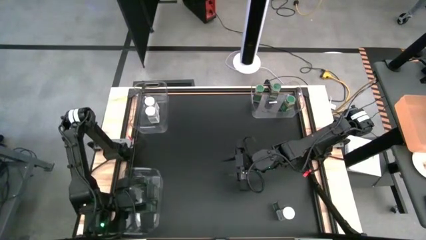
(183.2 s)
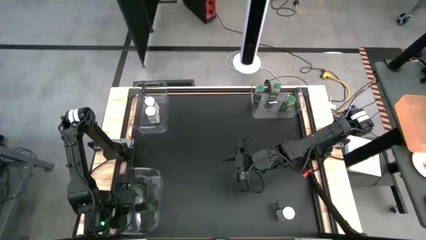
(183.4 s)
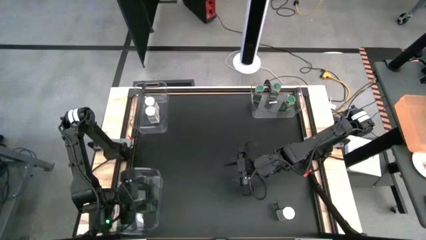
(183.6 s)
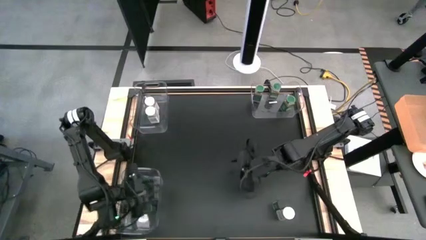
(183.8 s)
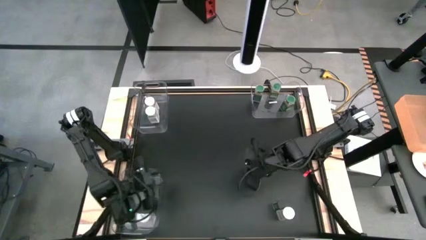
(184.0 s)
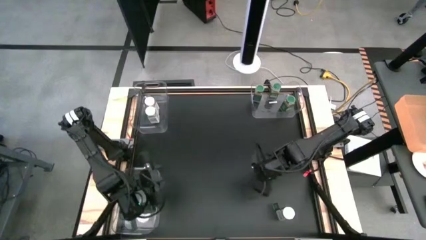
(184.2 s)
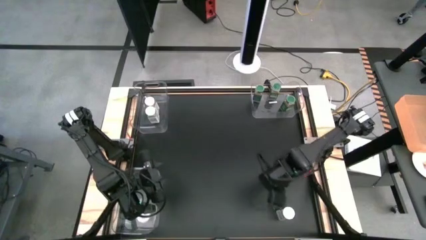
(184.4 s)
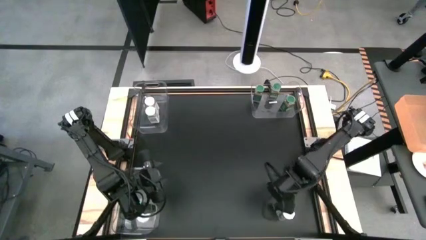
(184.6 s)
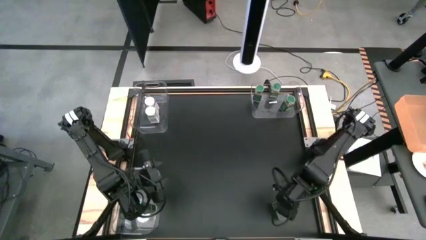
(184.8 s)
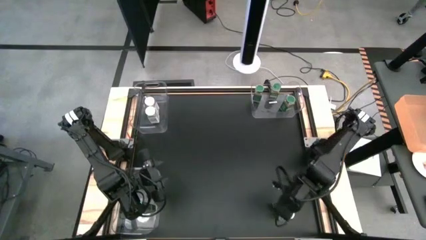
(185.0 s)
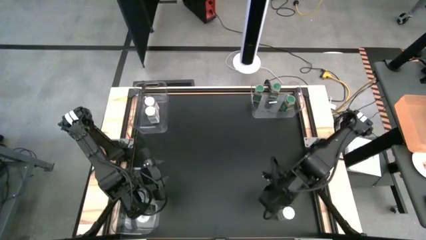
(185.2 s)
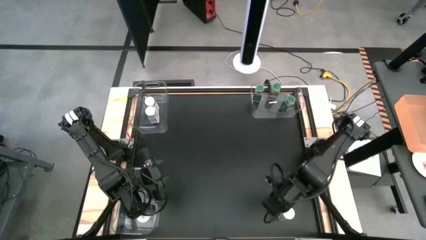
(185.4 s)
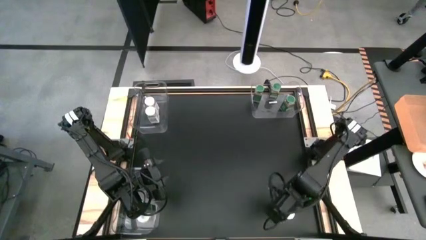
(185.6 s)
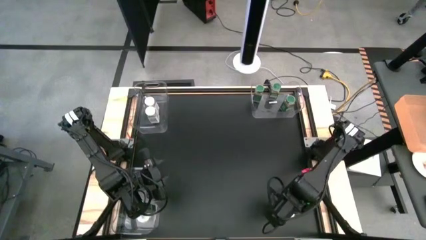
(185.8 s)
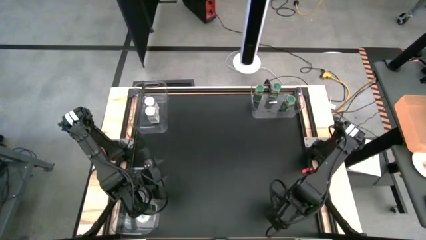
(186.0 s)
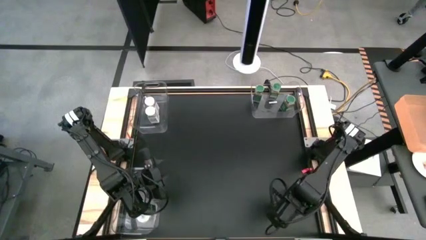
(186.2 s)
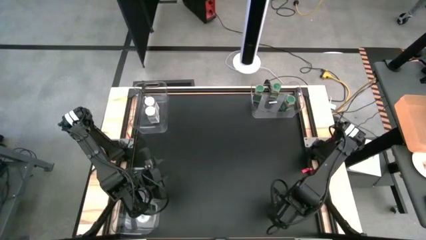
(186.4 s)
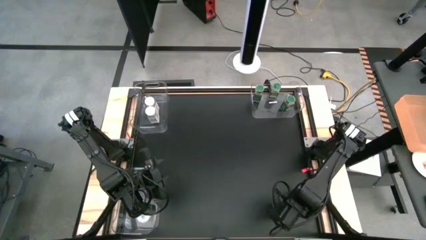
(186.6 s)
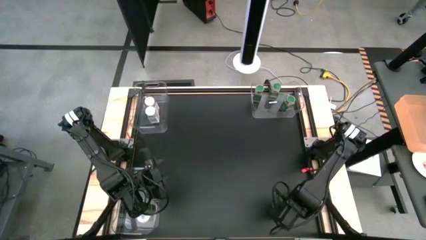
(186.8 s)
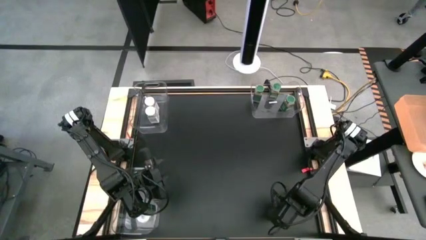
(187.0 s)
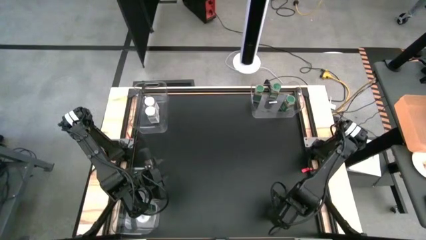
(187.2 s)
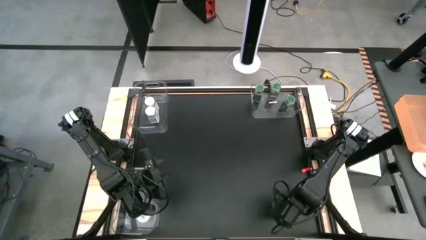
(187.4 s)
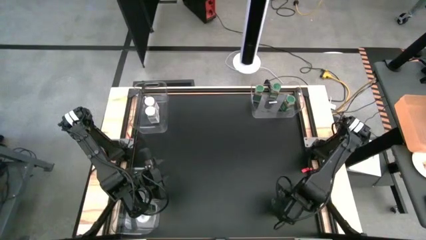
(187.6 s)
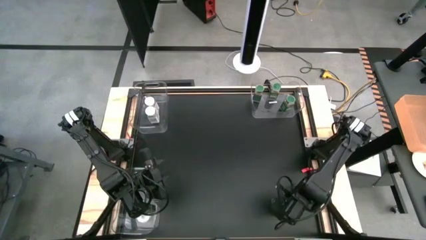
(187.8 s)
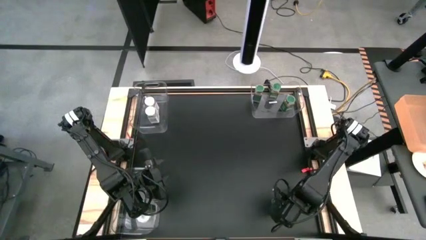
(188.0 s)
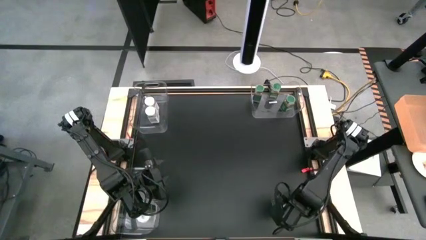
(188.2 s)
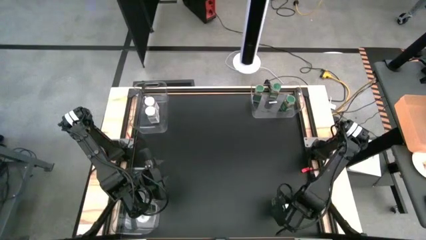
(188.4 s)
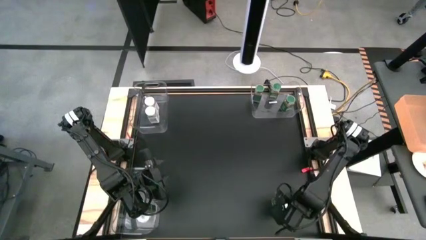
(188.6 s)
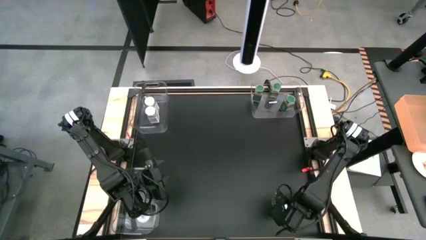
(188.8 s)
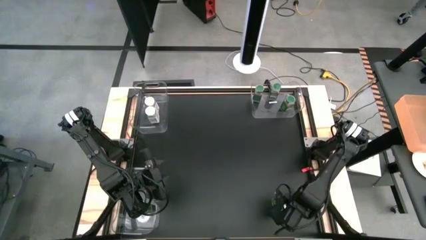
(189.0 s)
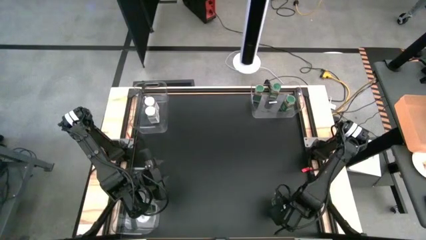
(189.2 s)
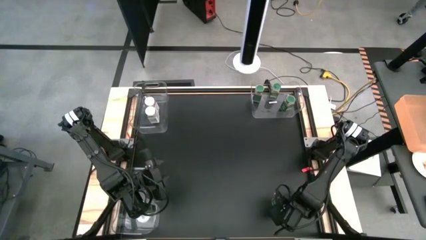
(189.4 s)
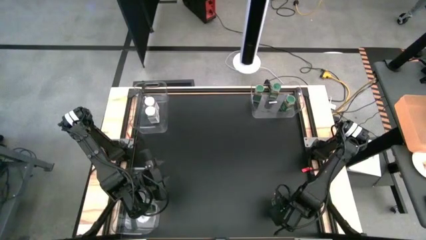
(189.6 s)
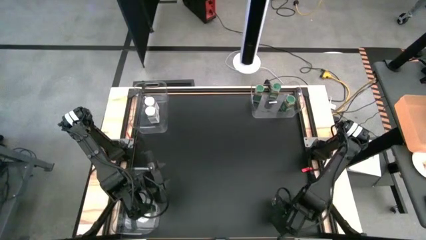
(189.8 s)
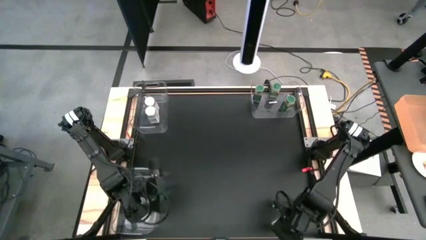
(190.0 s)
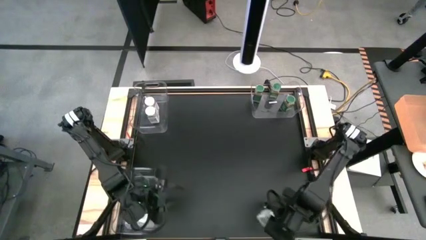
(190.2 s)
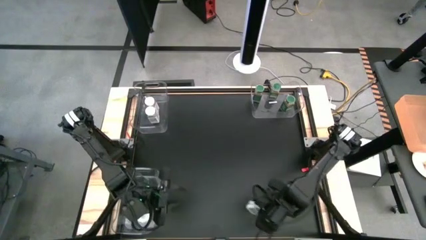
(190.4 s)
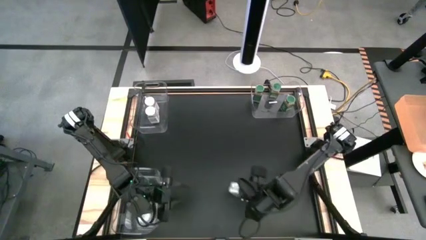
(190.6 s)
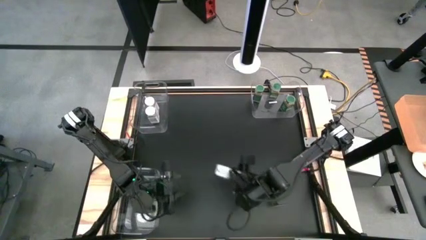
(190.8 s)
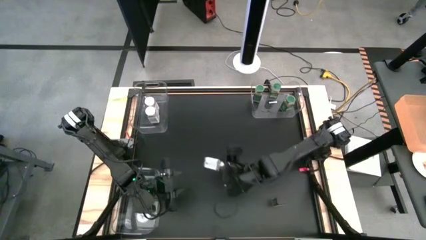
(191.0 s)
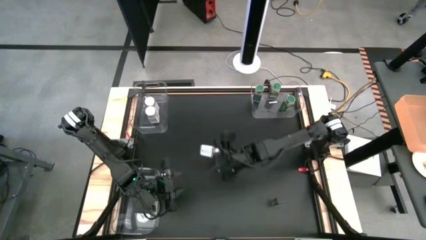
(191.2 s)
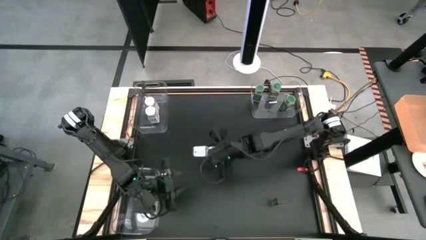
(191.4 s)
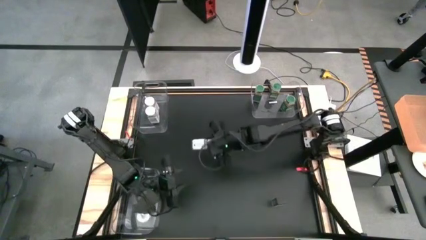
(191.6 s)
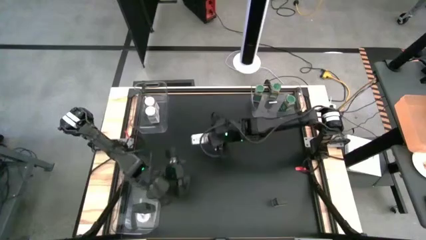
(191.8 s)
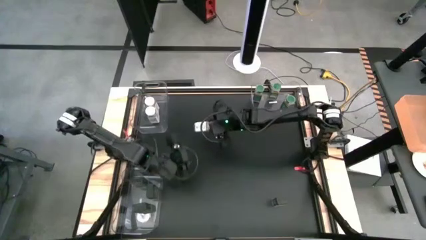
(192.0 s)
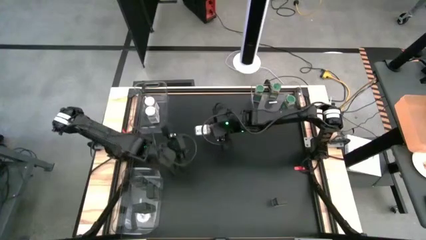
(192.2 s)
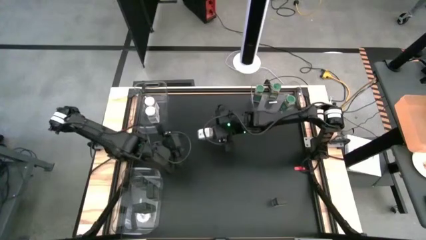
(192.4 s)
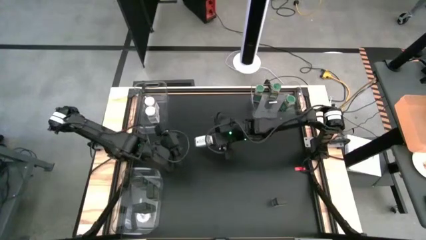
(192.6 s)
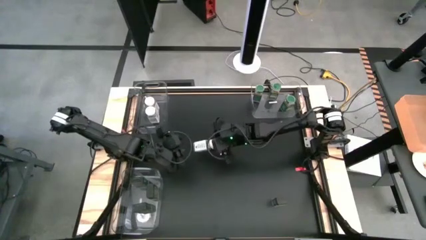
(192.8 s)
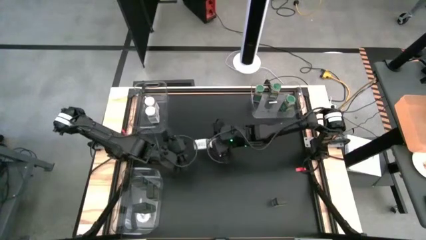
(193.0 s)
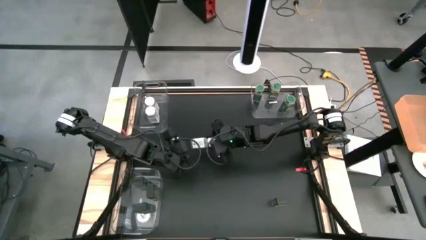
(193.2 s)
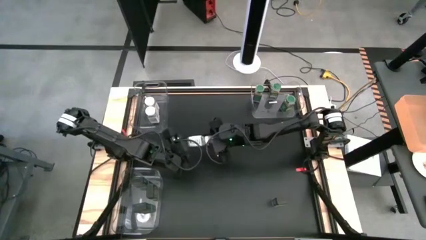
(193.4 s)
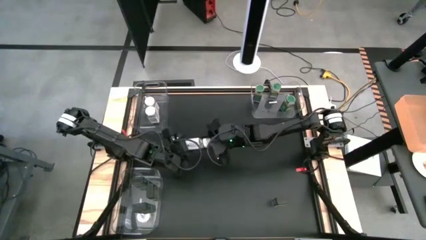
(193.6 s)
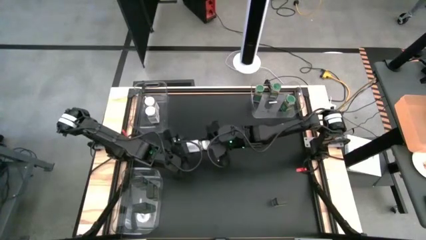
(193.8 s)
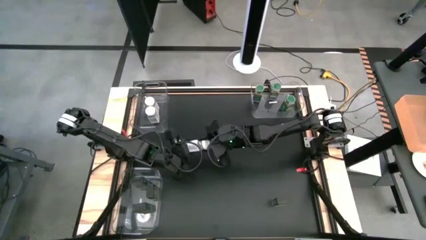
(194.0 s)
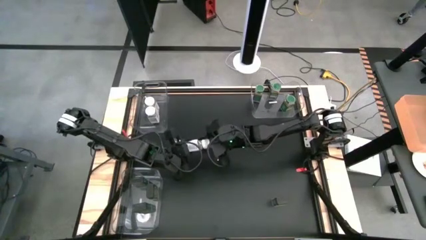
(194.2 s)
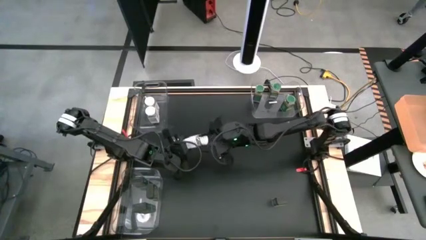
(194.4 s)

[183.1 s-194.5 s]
Task: Sort spices by type
Put the white seasoning bottle into the top left transparent bin

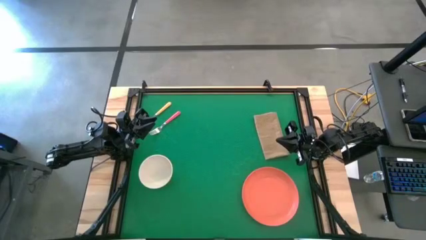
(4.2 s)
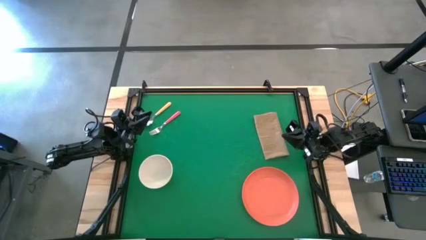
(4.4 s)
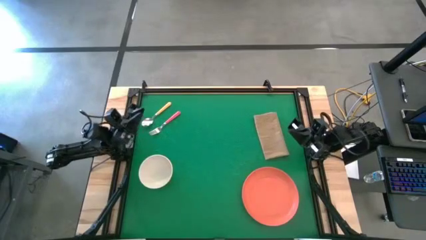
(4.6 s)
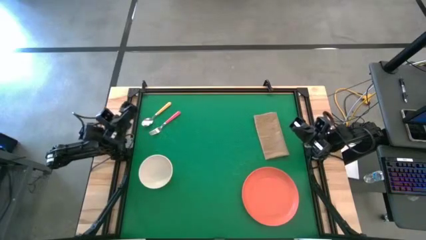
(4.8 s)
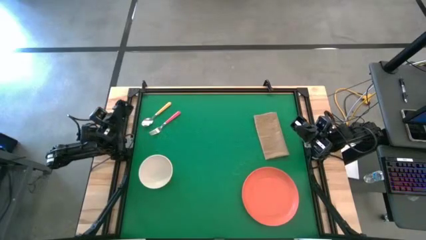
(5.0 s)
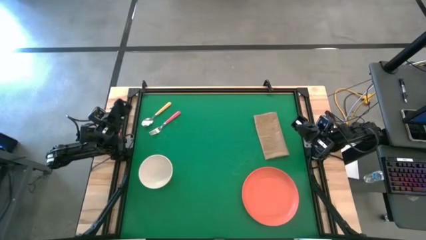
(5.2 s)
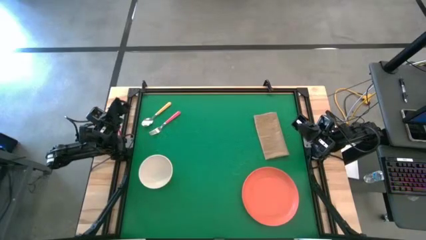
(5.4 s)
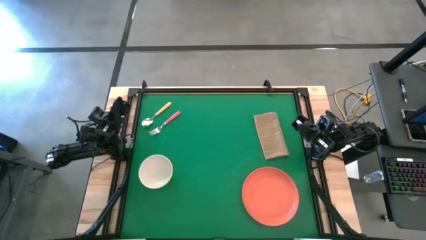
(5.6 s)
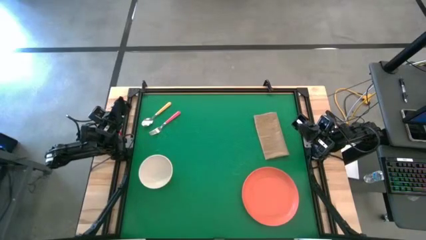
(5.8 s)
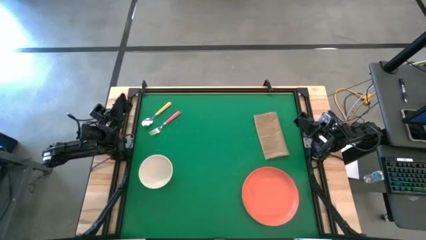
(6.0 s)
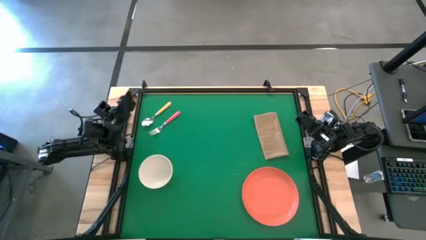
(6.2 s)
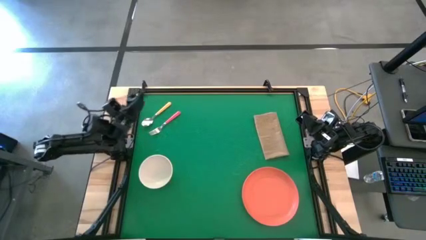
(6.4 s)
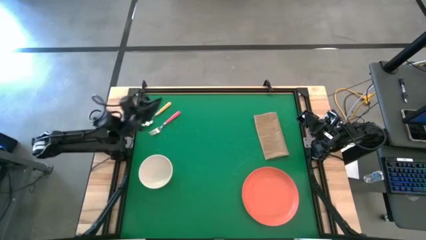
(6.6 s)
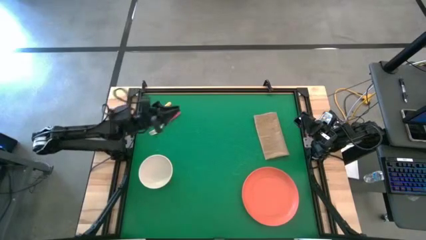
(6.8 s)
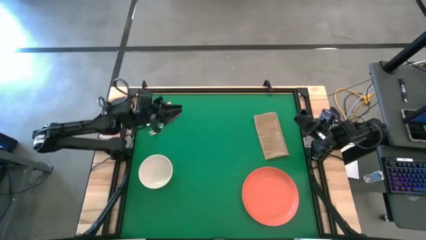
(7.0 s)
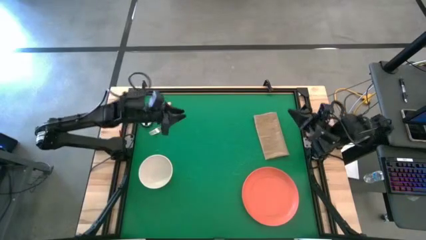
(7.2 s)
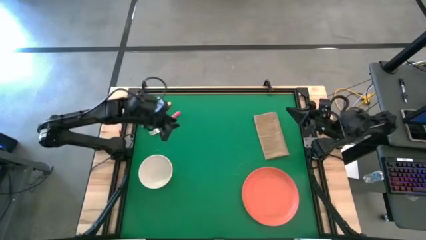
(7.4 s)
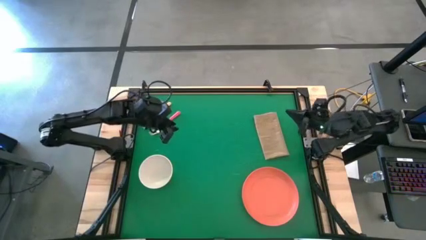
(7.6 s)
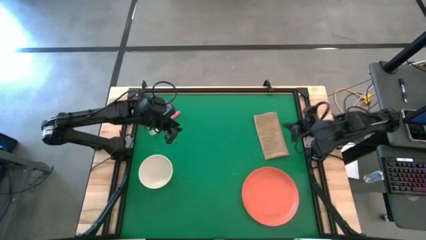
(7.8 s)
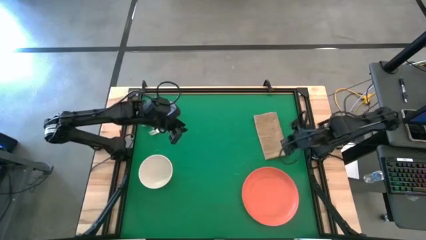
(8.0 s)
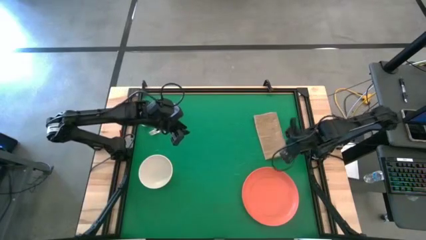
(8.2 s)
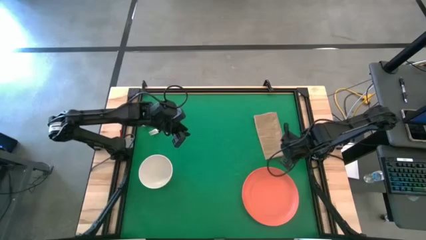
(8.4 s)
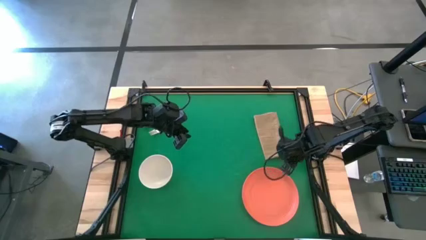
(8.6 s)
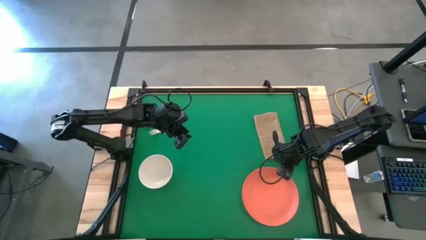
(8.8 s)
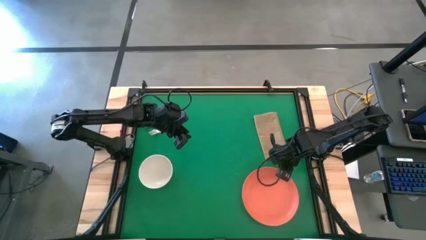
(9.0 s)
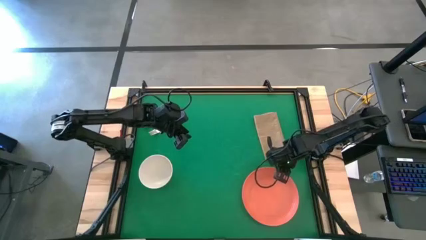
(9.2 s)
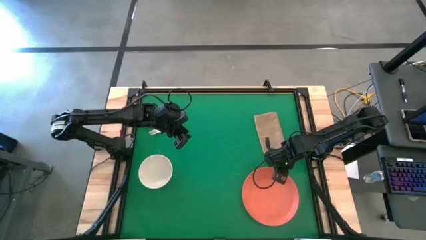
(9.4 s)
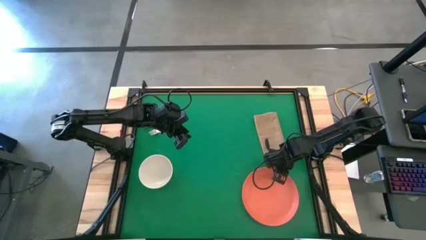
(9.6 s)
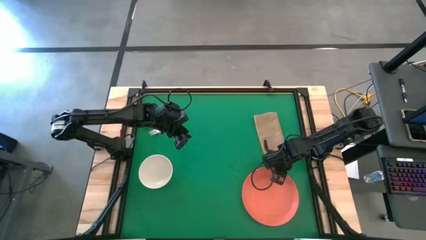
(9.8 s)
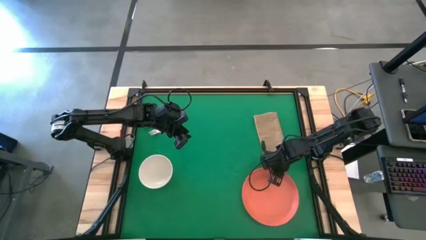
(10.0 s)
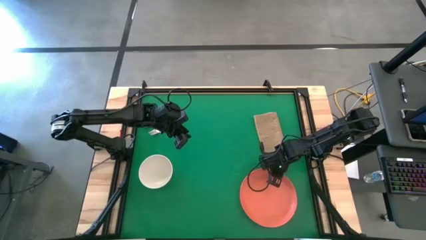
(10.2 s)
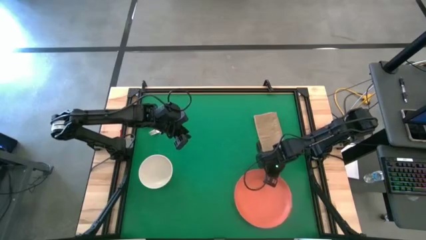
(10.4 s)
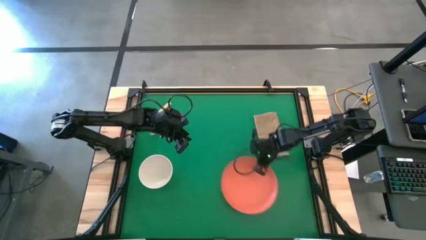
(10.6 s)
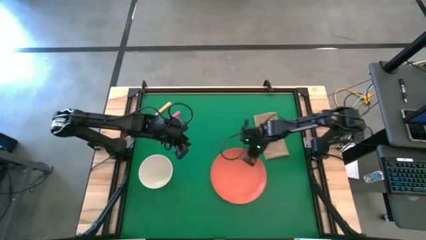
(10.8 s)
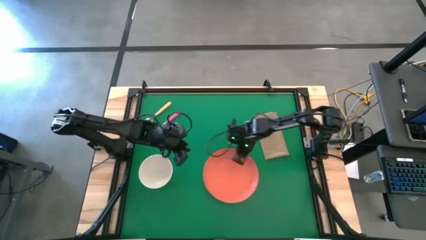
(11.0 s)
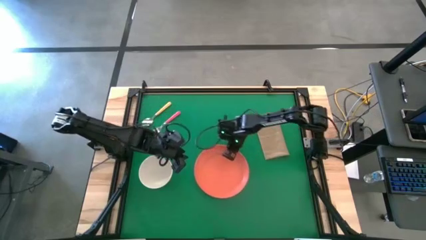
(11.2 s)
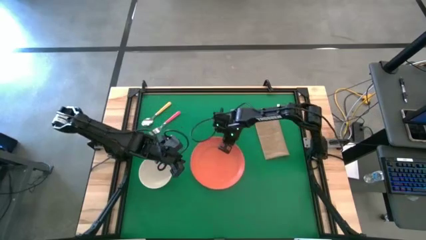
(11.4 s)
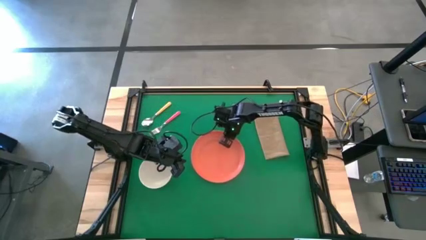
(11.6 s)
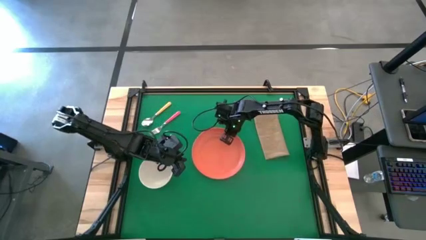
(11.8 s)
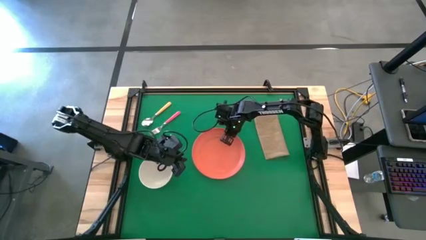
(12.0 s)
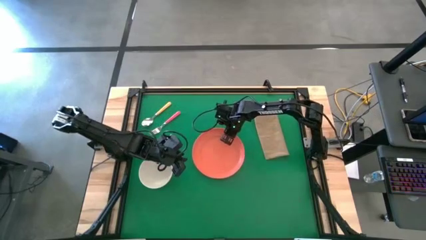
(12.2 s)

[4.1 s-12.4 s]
Task: Set table place
Move the orange plate to the center of the table
